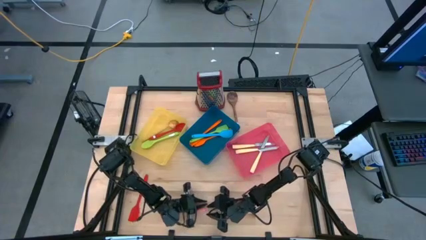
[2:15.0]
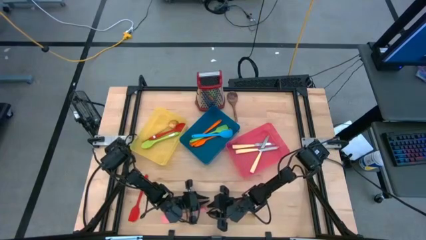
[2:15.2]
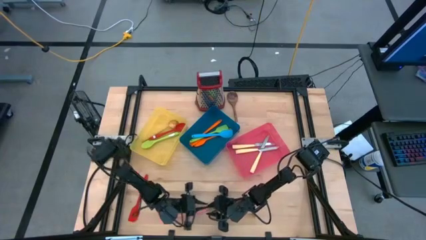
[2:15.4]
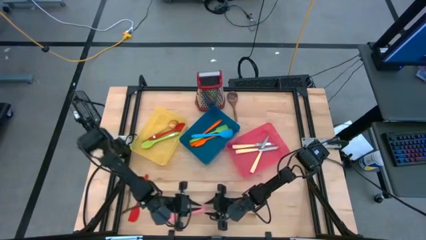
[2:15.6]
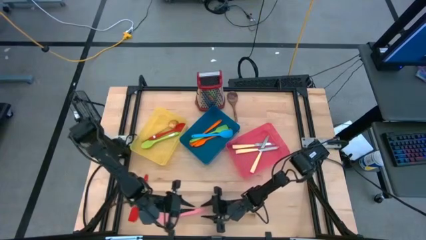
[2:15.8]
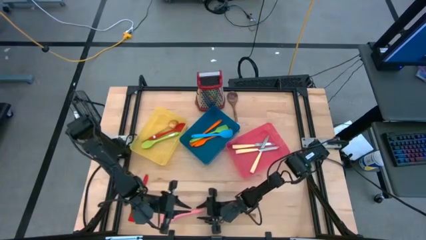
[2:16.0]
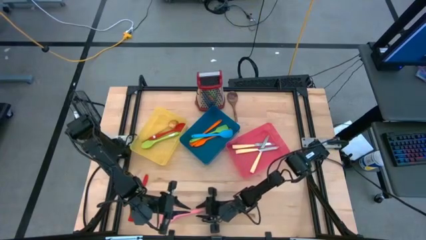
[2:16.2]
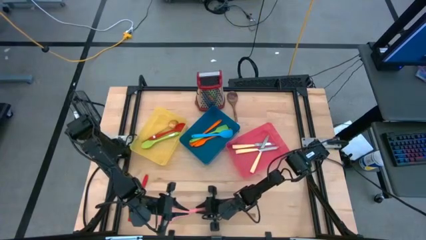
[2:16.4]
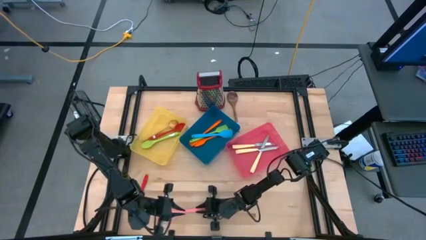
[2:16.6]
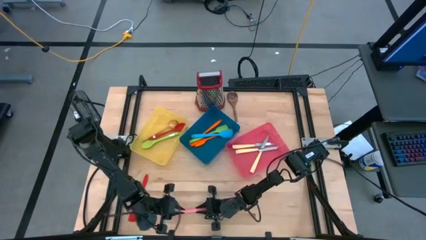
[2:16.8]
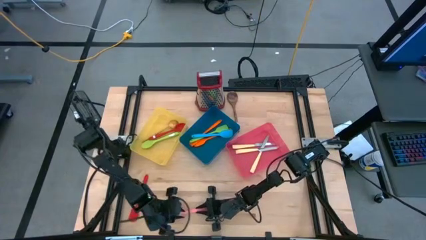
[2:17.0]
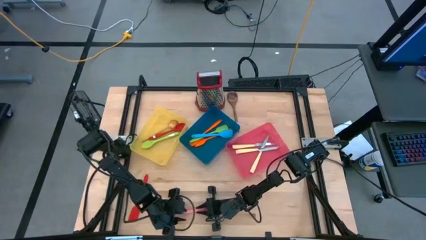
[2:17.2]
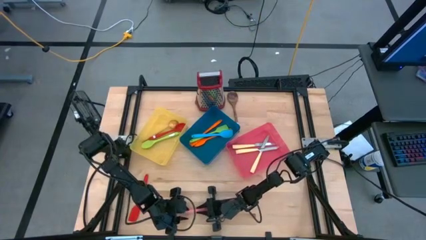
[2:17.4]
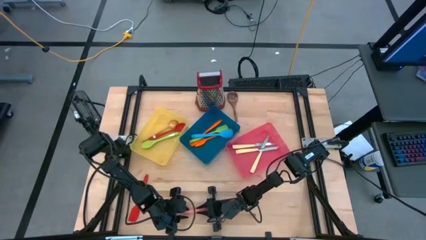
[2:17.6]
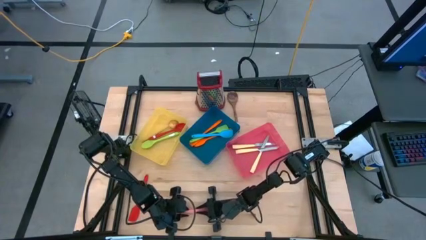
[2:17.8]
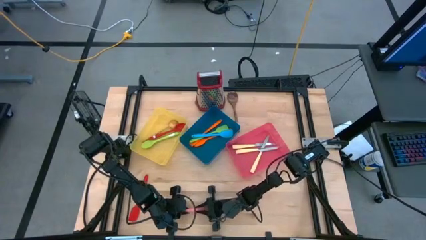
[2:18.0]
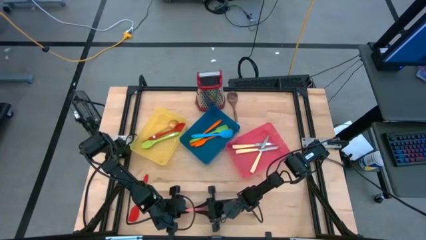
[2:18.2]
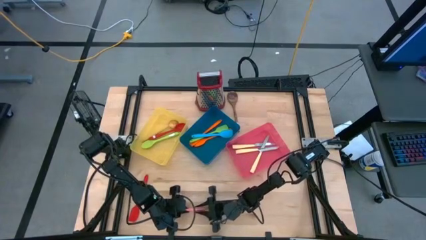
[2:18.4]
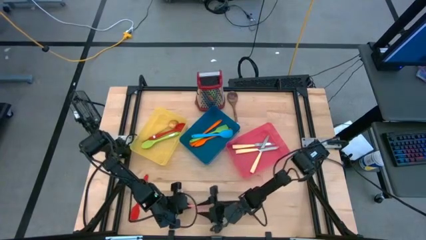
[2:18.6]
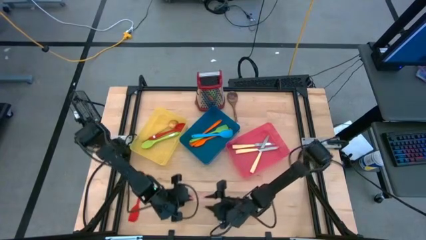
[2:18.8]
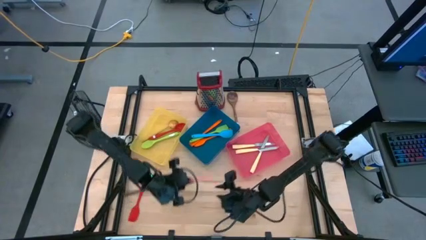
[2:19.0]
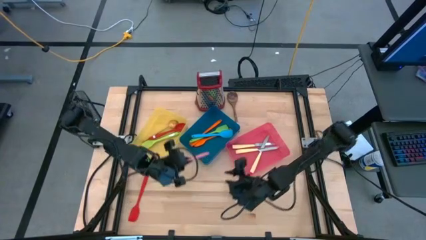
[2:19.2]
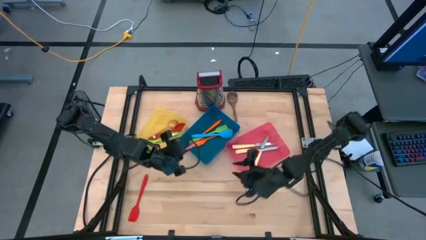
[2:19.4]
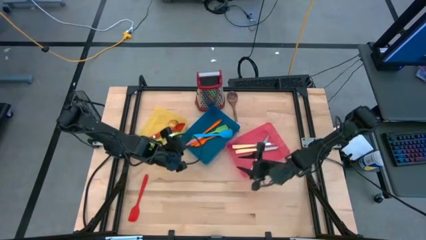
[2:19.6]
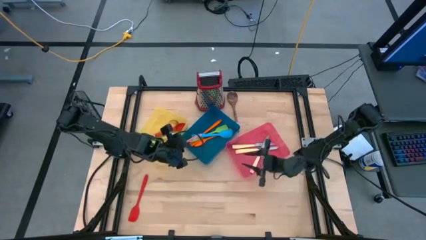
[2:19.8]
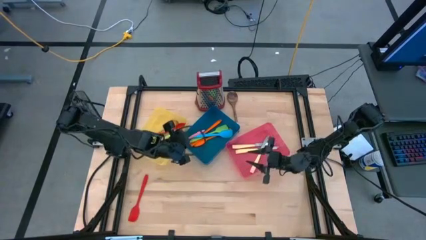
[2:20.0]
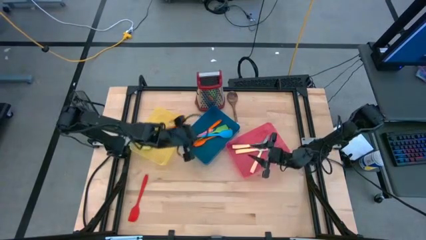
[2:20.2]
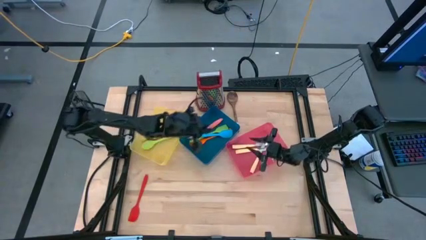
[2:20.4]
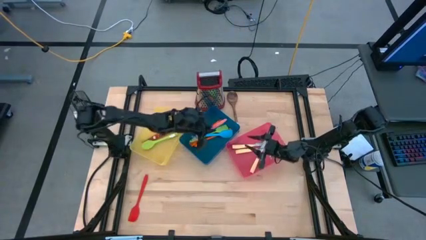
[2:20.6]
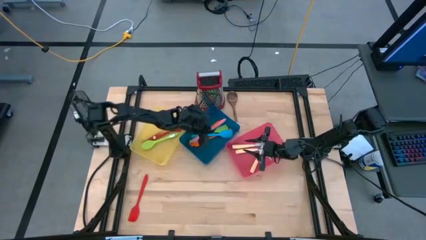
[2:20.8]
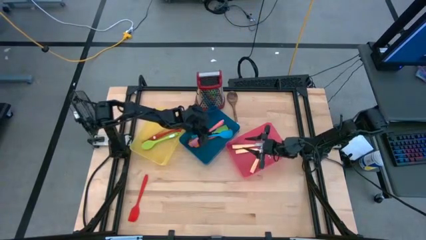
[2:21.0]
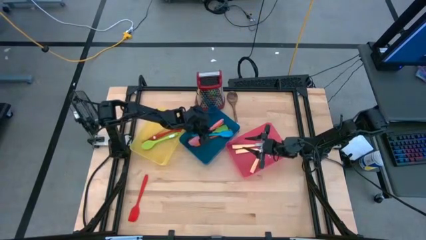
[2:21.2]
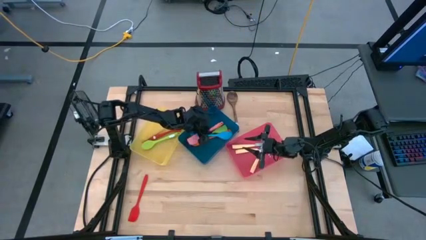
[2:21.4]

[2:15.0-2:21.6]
Task: Pick & Place Kitchen Items
Put the pink spatula into the blue bin

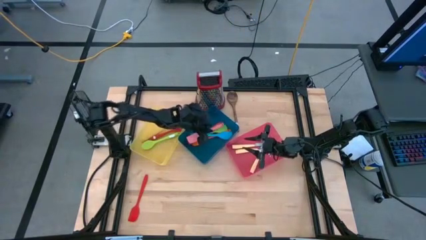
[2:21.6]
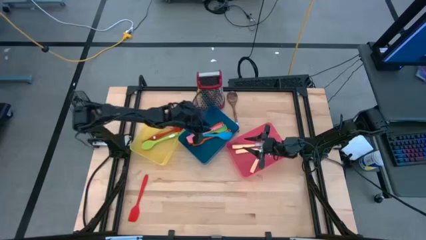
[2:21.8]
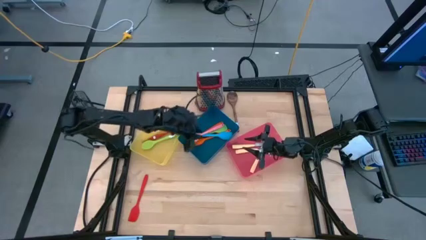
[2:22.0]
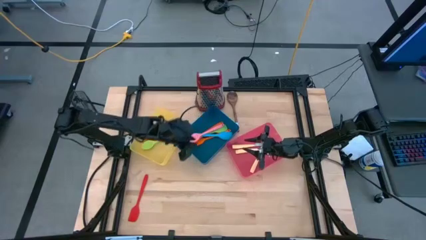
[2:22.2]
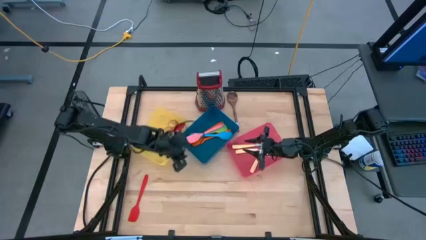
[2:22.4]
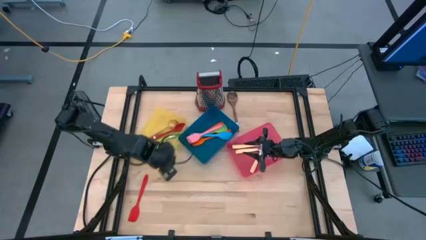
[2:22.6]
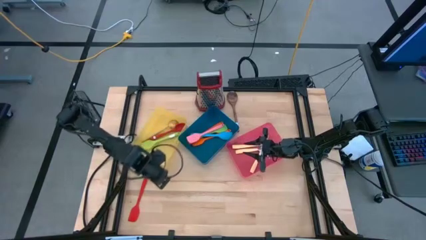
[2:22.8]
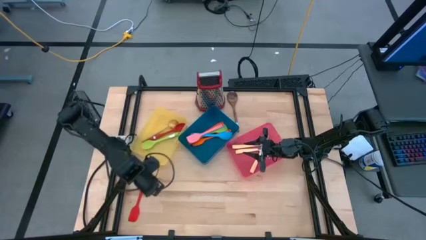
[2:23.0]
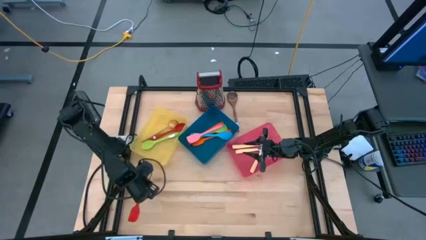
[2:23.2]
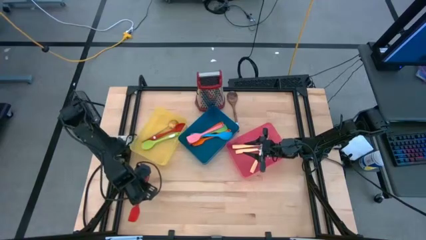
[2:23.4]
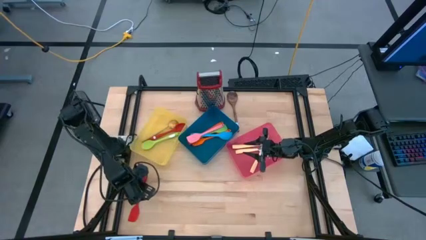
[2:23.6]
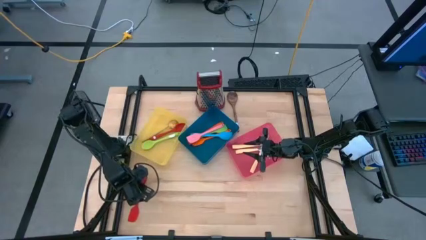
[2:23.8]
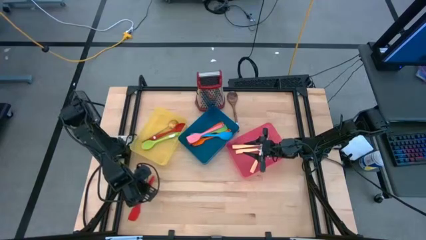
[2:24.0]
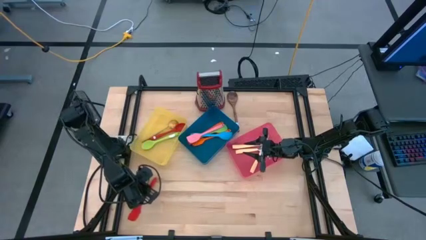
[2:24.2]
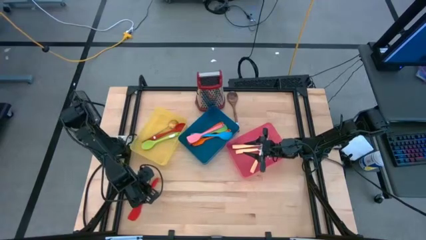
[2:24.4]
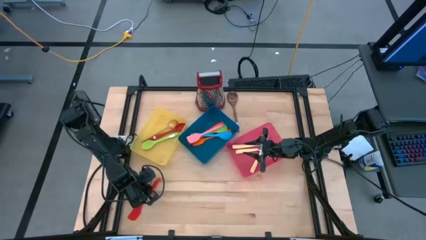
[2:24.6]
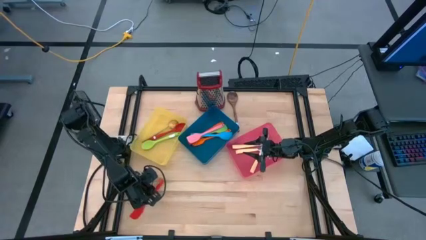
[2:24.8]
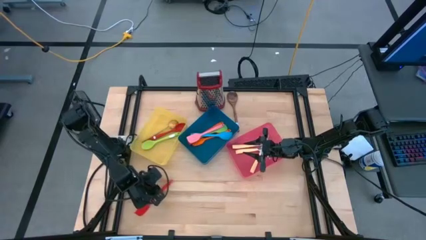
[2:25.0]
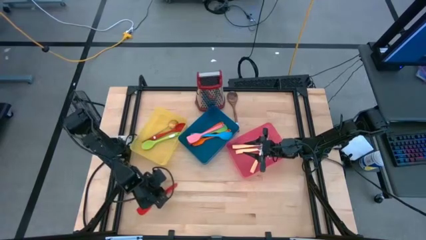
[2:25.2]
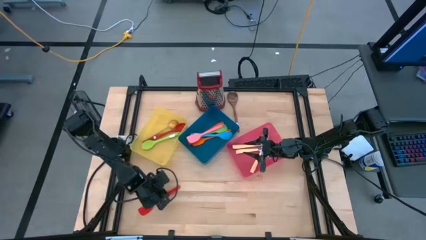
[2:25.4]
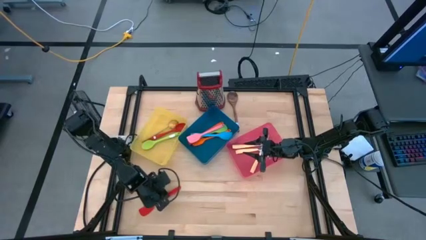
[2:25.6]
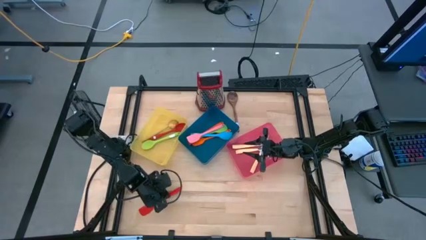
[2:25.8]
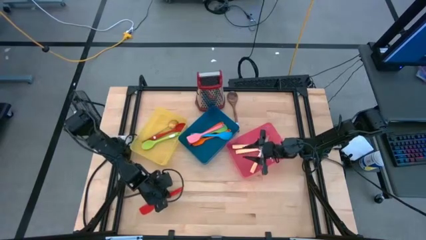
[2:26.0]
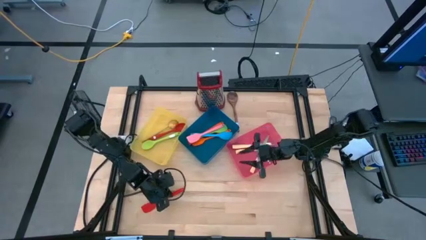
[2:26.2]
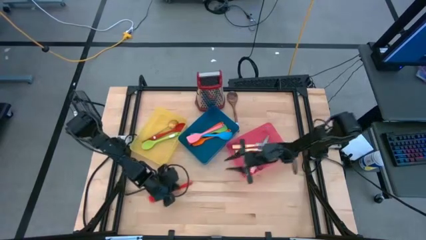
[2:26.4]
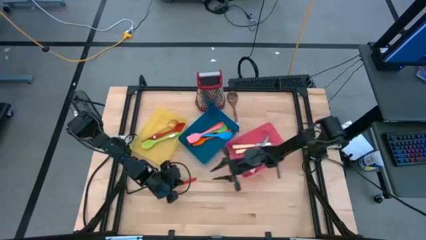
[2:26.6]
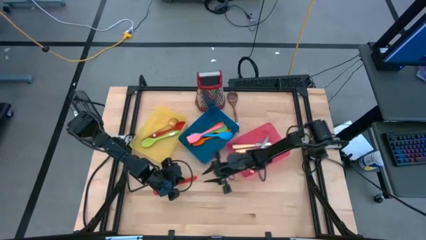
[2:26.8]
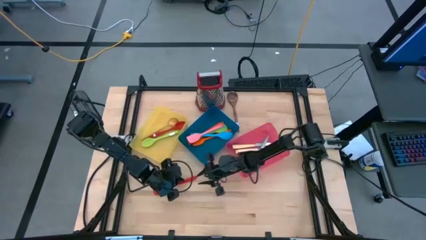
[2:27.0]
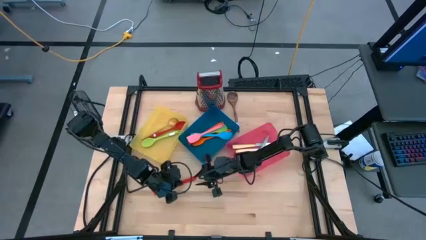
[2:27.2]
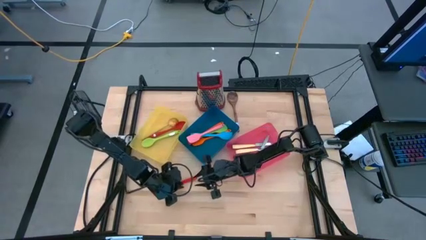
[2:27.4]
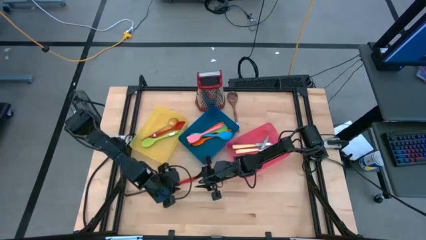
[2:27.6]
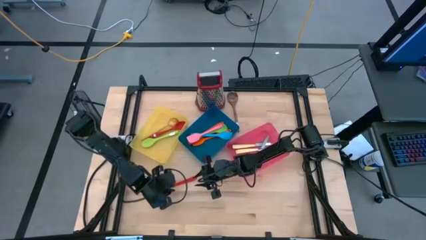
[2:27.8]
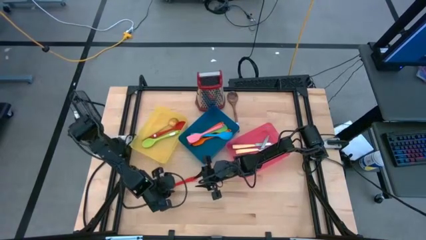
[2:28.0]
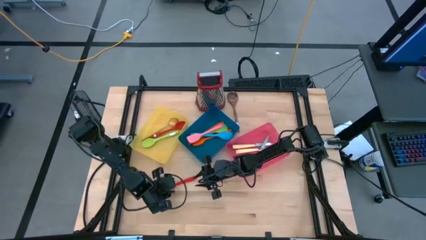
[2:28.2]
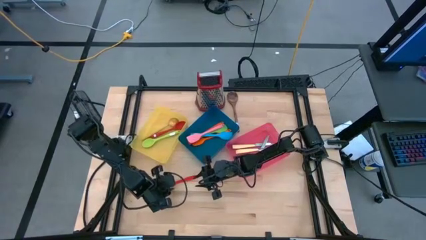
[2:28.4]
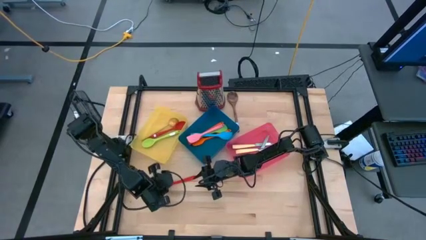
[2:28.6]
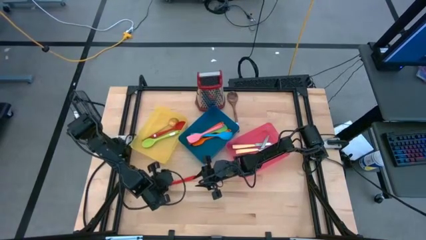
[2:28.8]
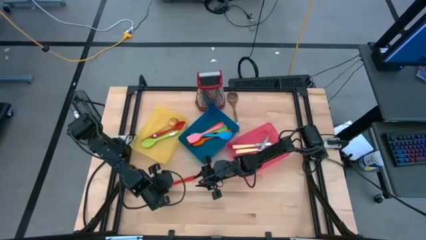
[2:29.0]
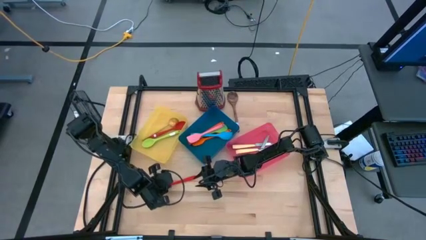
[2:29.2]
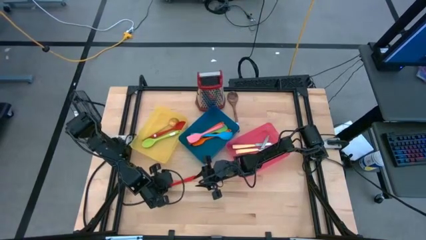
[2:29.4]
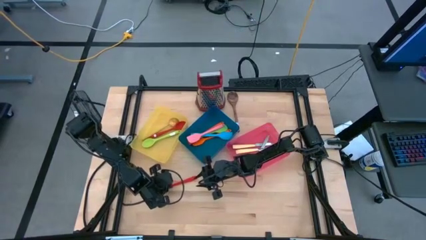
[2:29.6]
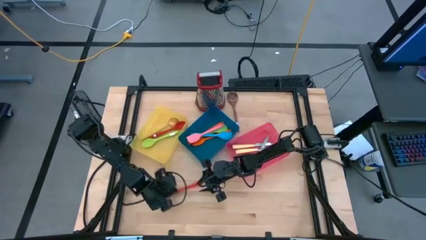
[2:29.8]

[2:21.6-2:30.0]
Put the red spatula into the blue bin
